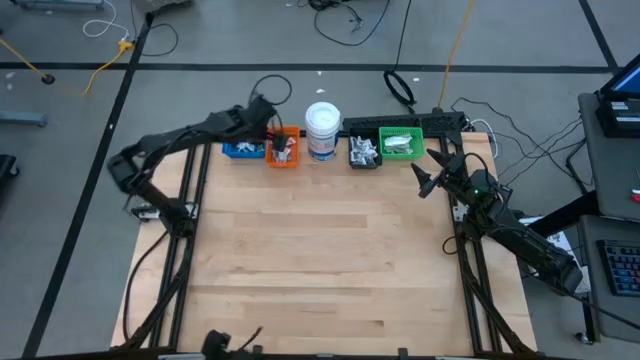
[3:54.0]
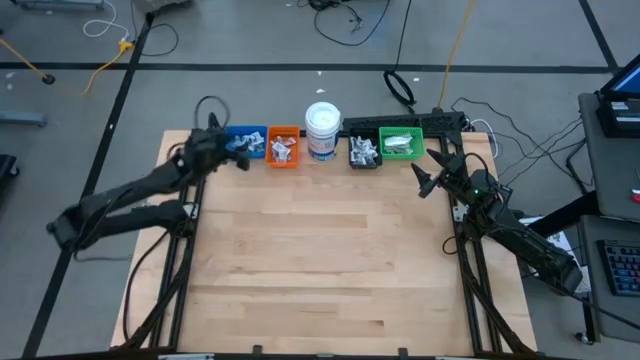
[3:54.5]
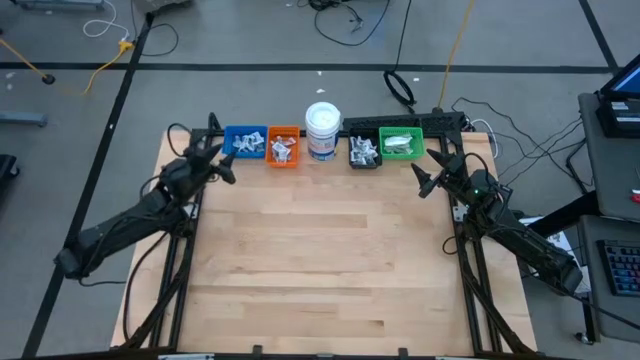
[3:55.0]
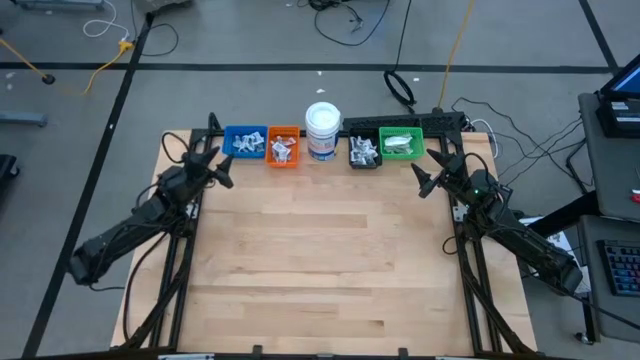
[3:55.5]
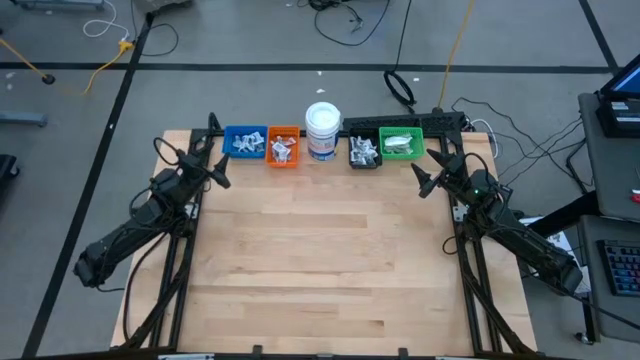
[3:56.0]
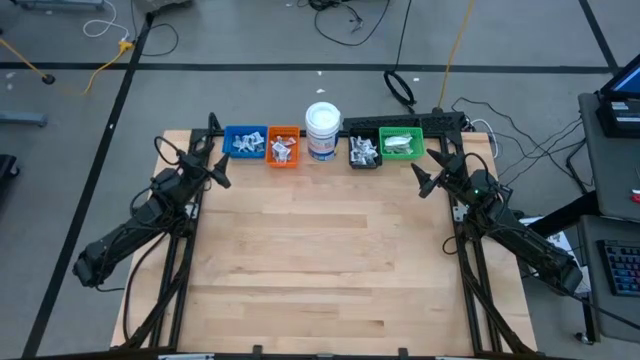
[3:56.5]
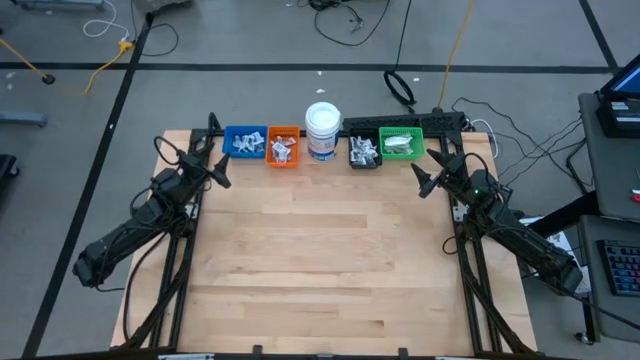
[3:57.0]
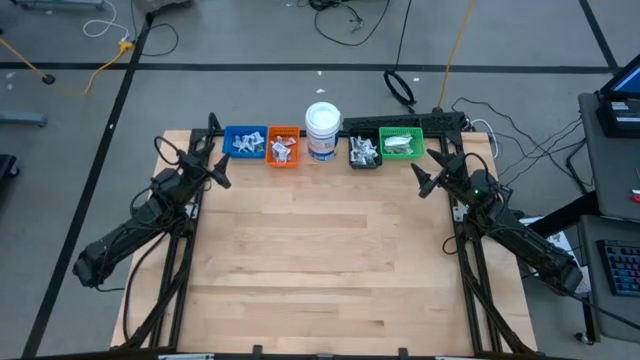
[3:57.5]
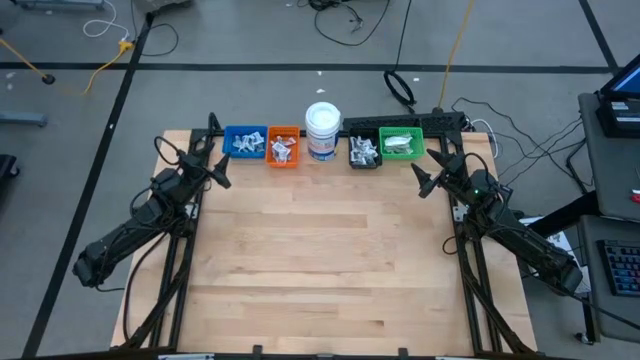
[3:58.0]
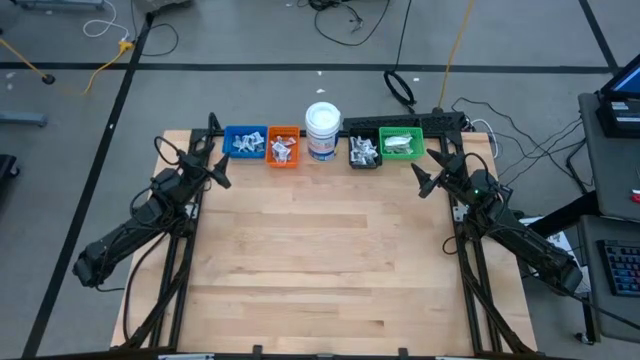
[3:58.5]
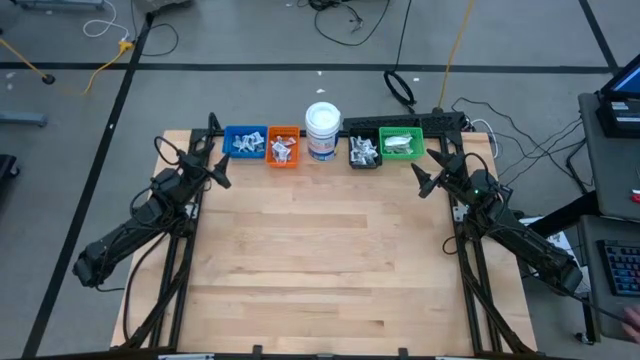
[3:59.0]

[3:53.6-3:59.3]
Task: Pick & Place First Aid Supplies
Return to Home Position

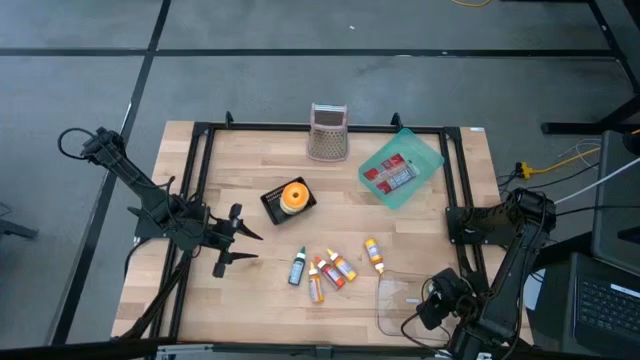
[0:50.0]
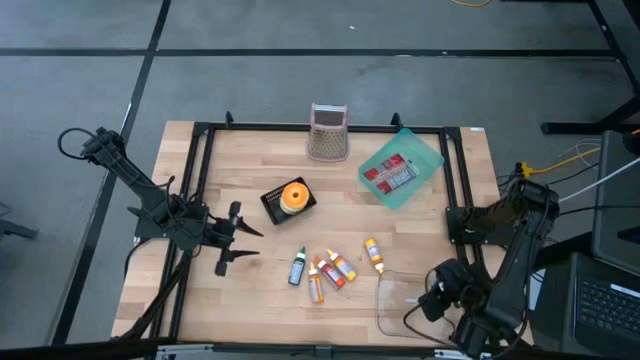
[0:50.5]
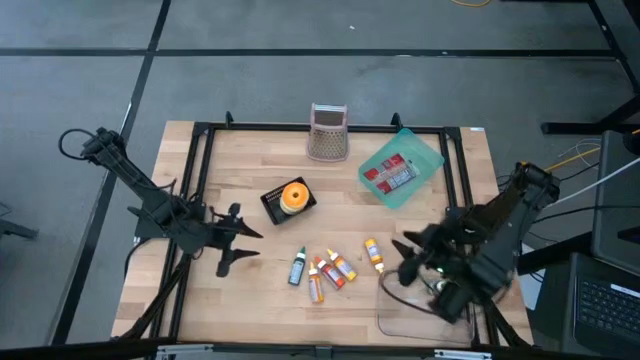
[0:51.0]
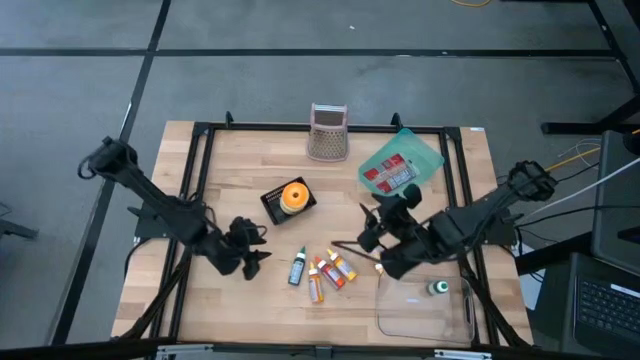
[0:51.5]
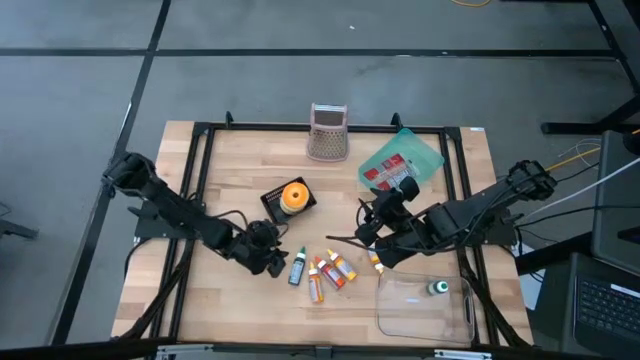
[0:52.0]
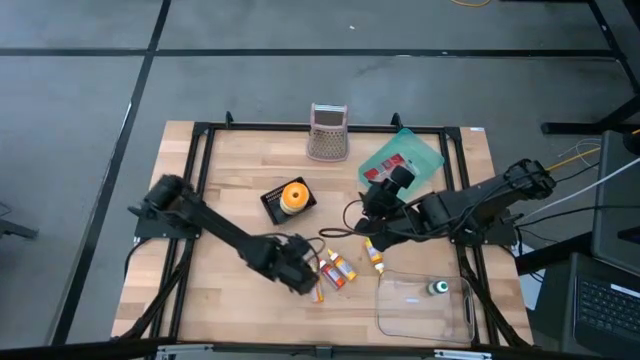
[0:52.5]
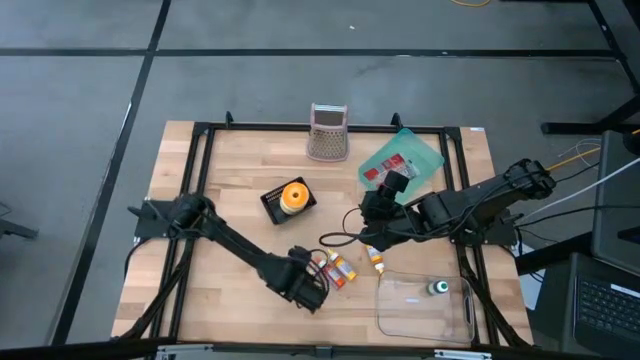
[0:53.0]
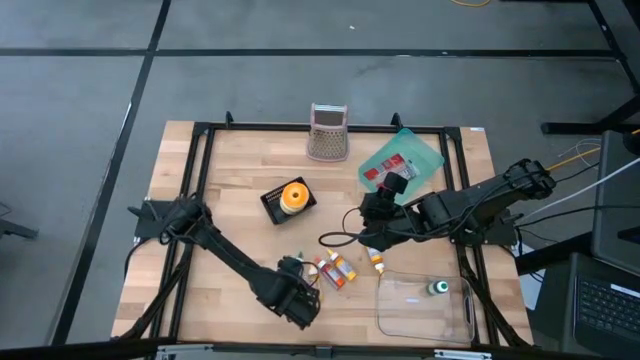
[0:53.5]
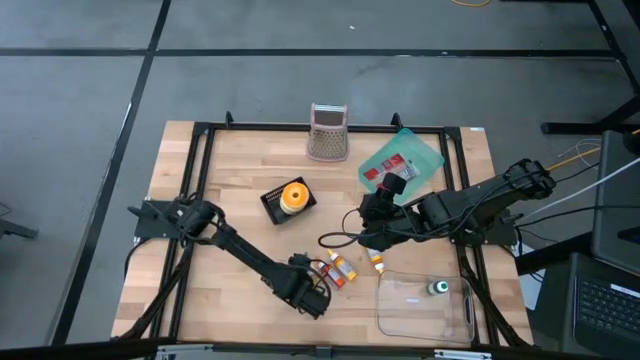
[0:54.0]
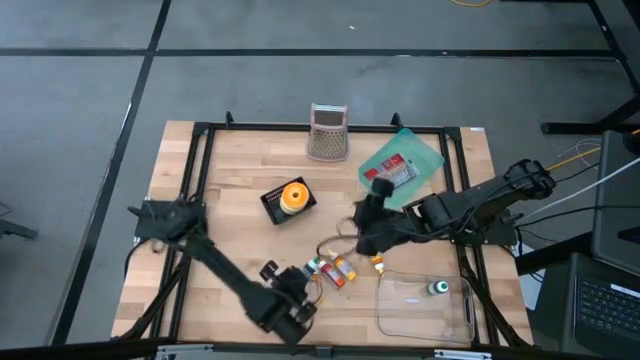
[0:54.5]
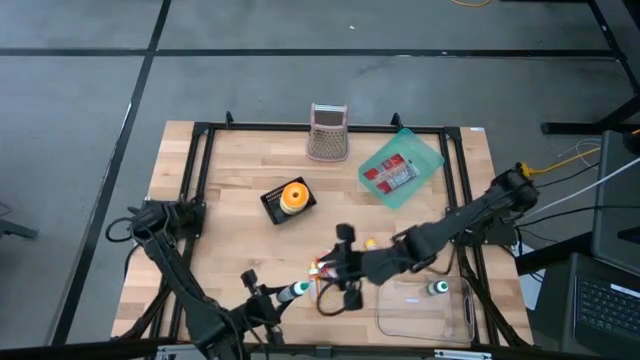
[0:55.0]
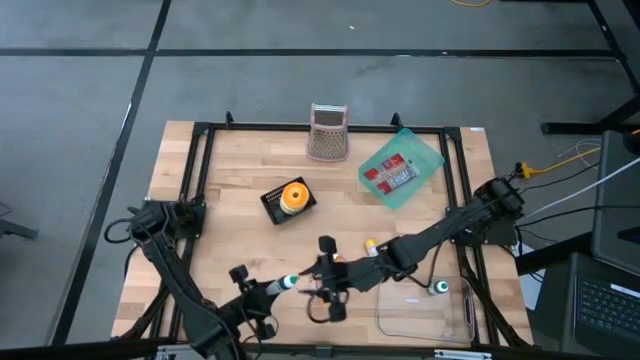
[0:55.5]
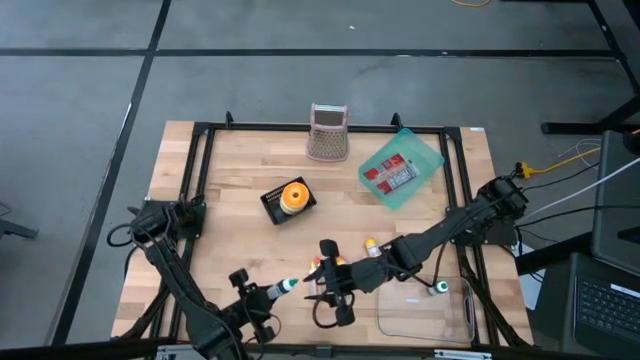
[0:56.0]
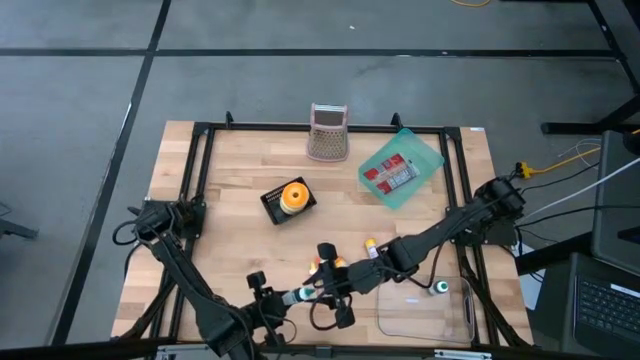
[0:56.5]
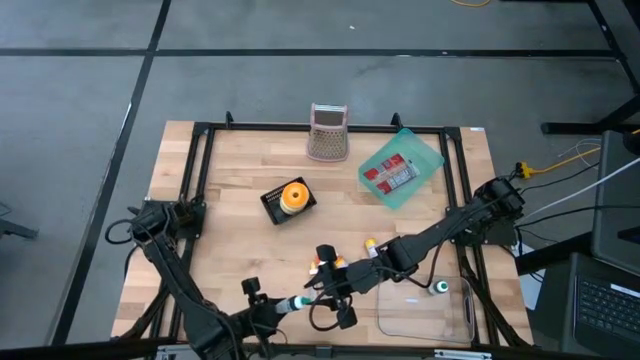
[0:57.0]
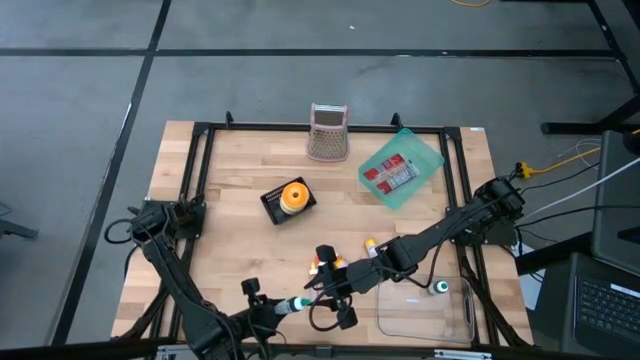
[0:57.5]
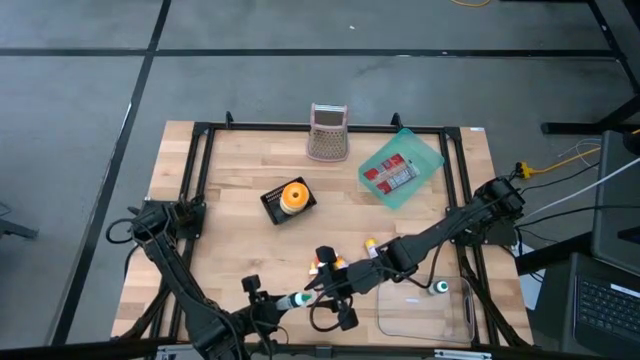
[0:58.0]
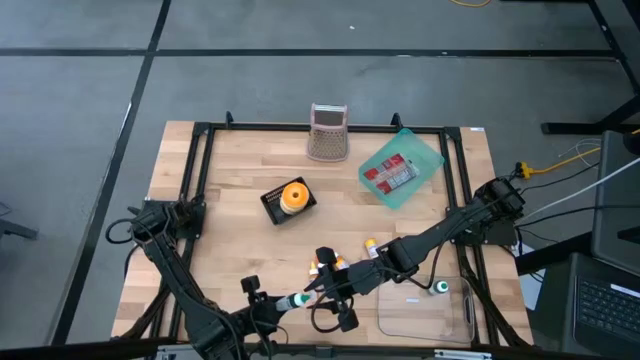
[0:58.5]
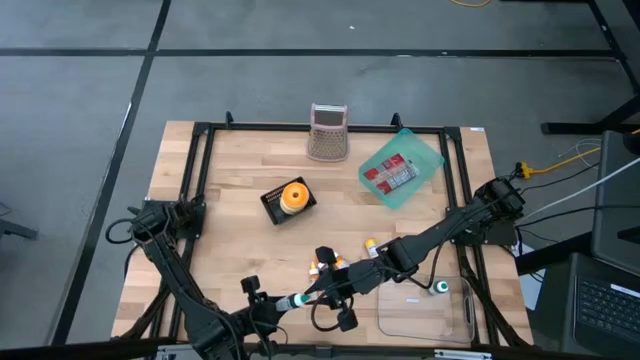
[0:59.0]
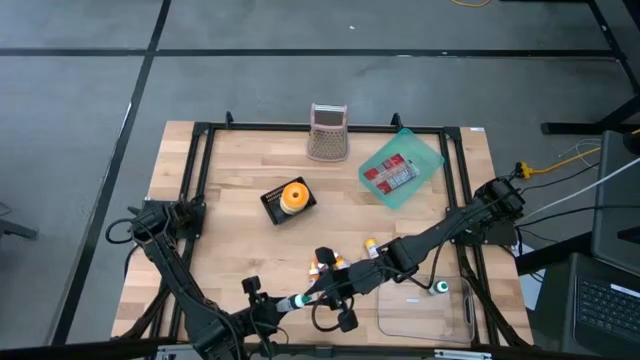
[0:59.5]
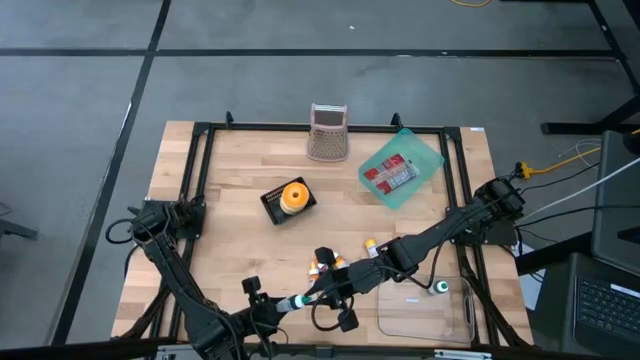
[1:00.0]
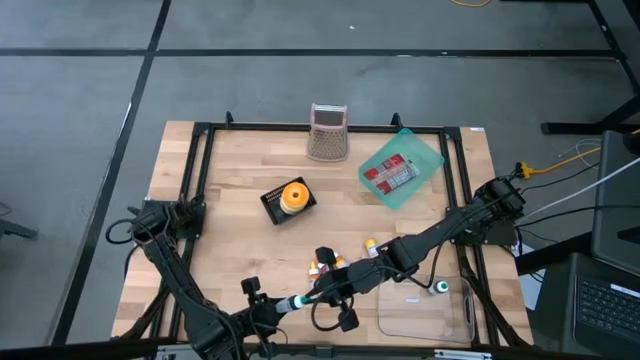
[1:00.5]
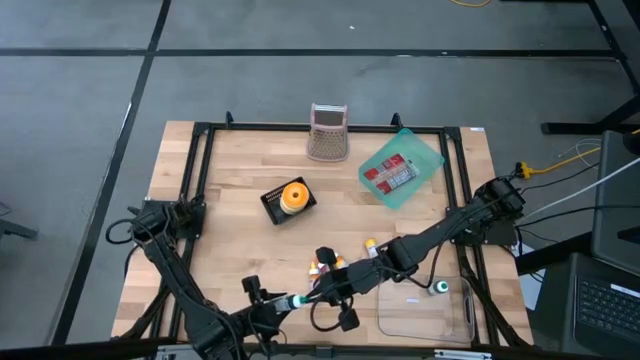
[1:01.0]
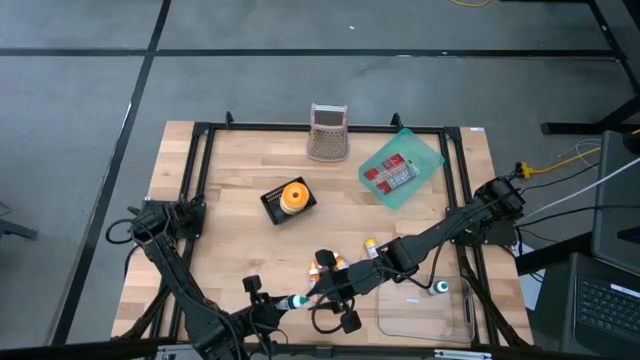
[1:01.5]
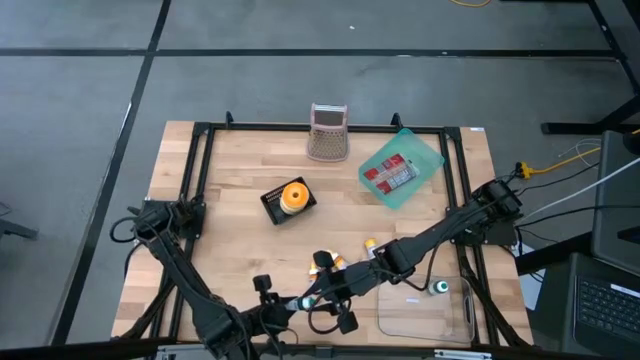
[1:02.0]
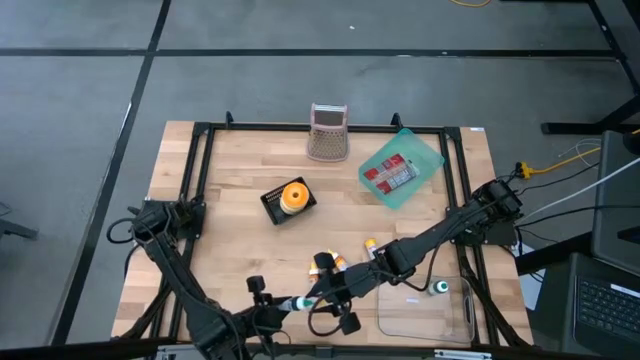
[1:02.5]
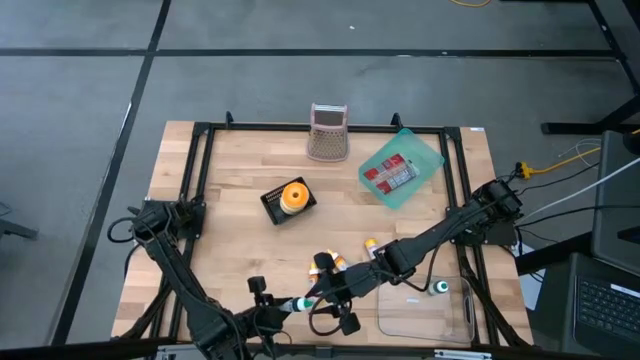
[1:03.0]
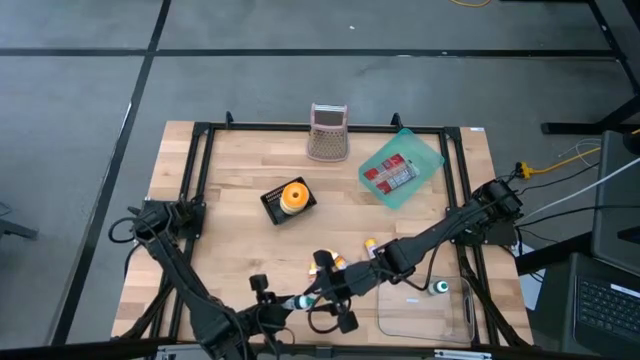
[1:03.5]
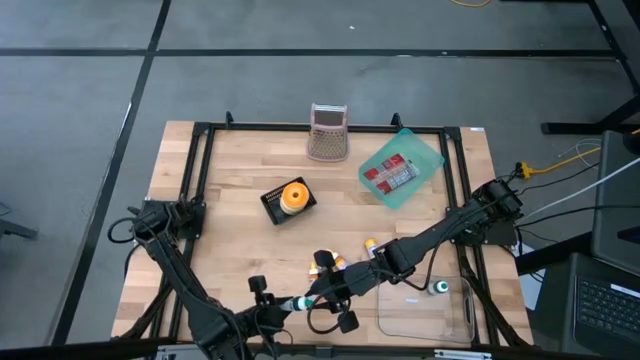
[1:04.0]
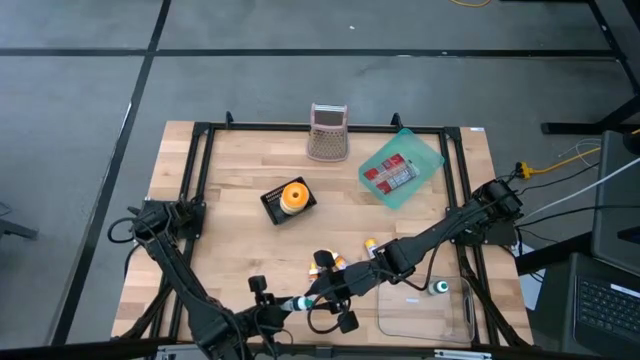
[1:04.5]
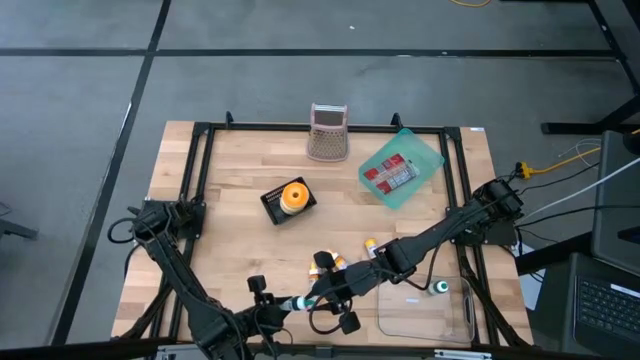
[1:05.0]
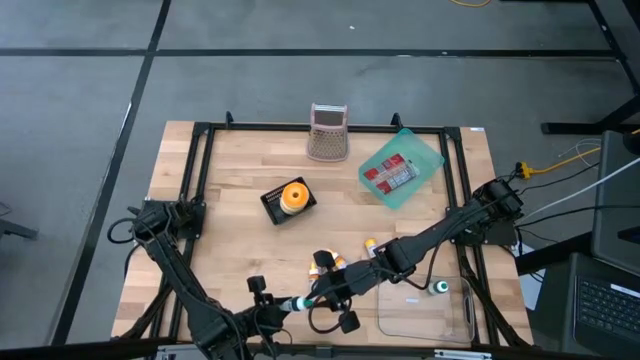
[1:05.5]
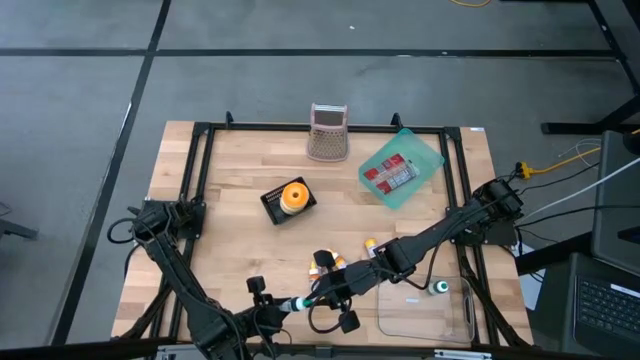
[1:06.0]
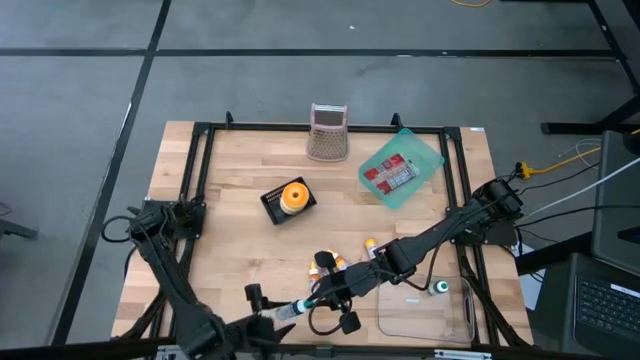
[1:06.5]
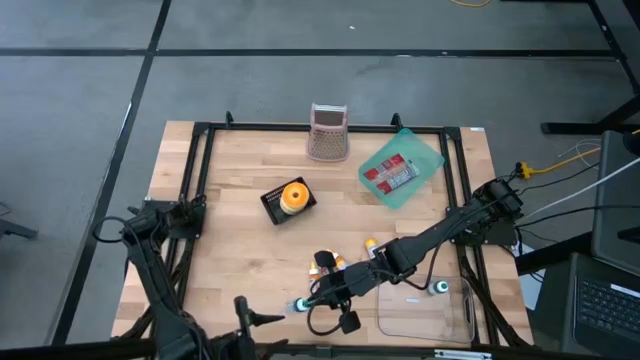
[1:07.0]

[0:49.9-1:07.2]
Task: Pick & Place Food Item
Put the green food coloring bottle into the transparent bin
